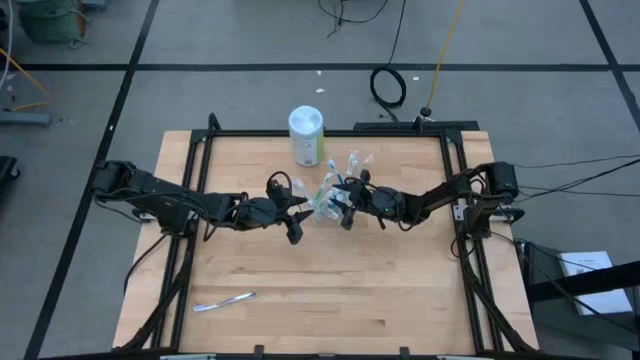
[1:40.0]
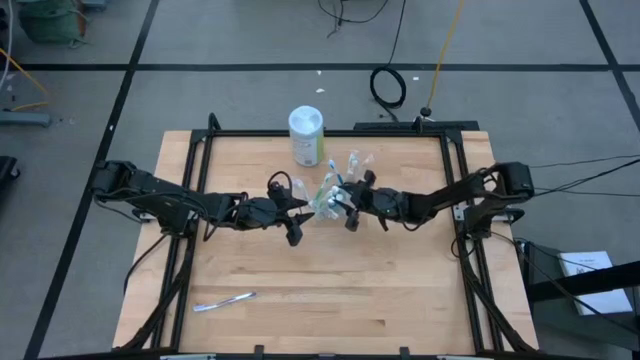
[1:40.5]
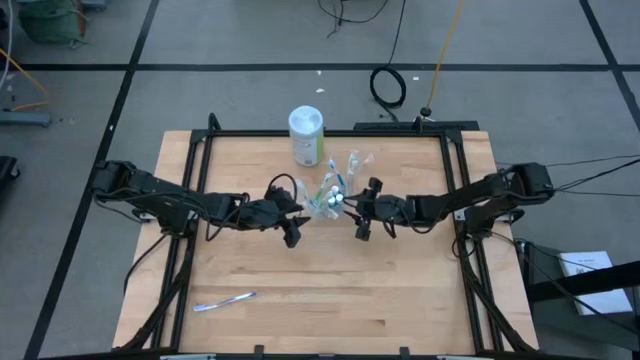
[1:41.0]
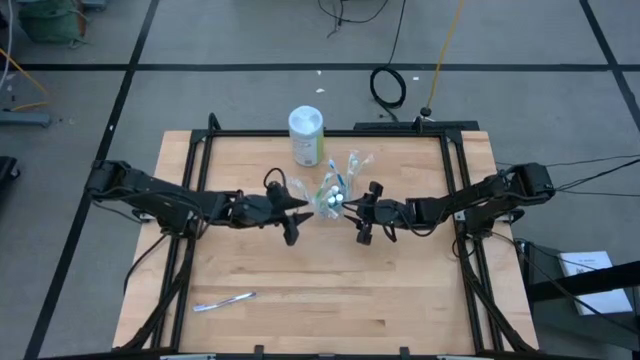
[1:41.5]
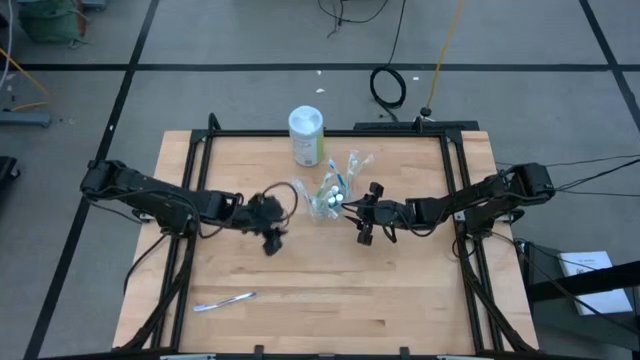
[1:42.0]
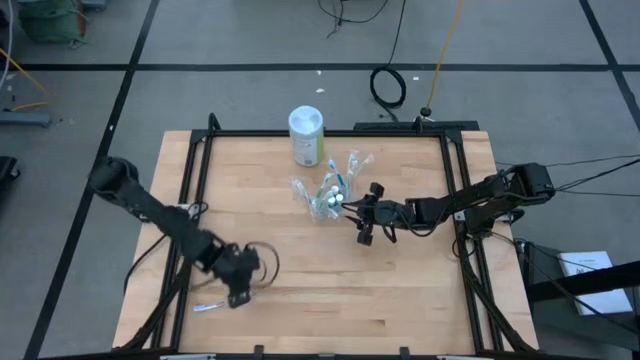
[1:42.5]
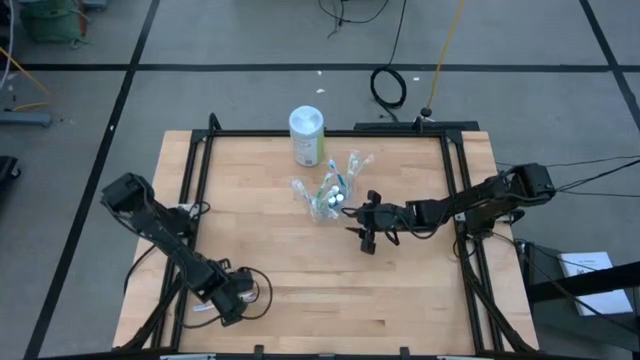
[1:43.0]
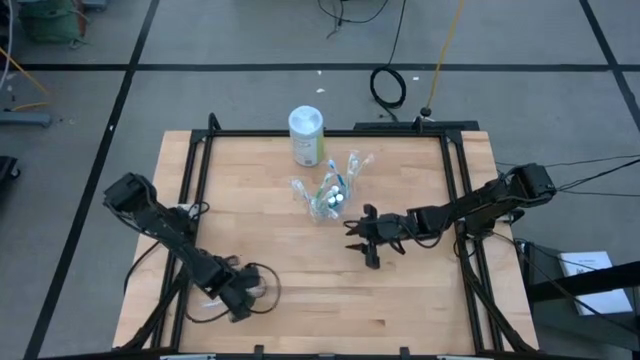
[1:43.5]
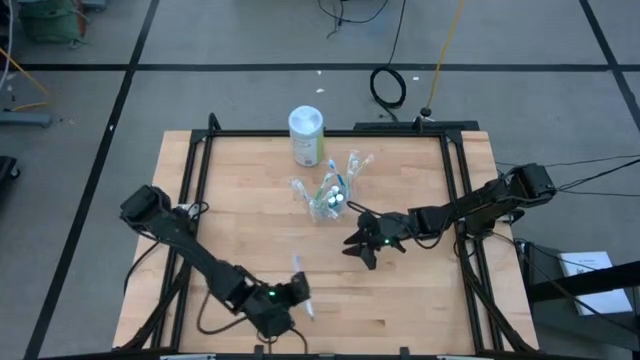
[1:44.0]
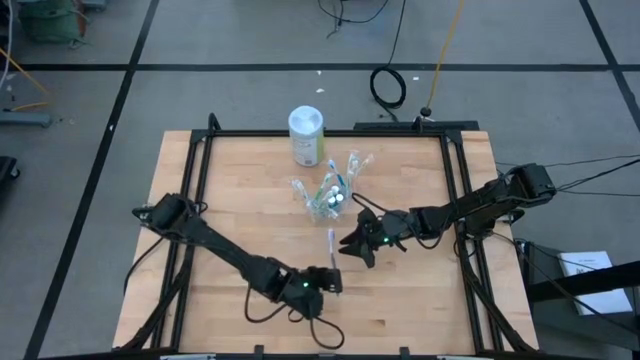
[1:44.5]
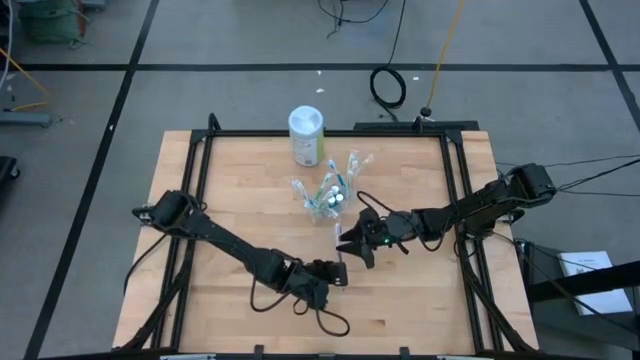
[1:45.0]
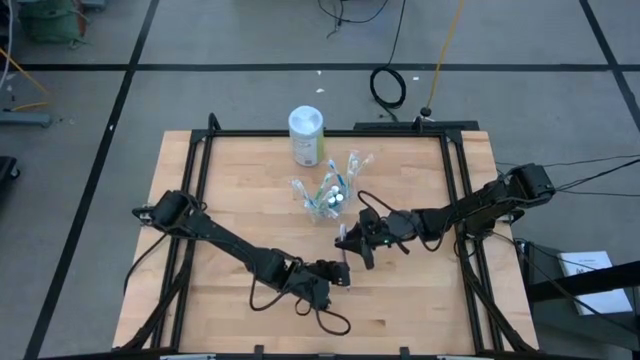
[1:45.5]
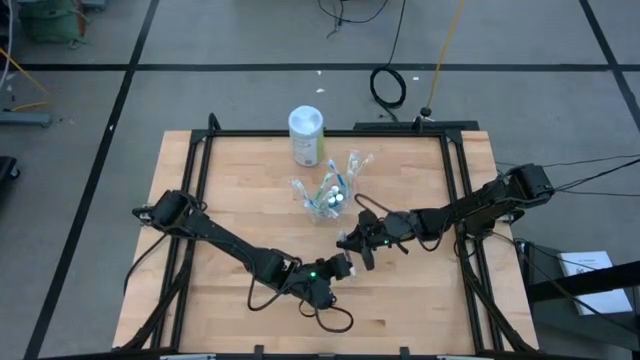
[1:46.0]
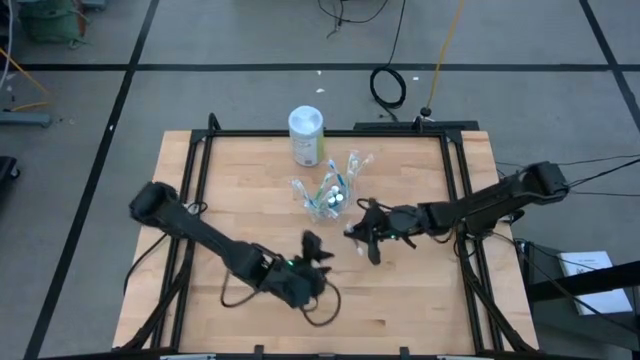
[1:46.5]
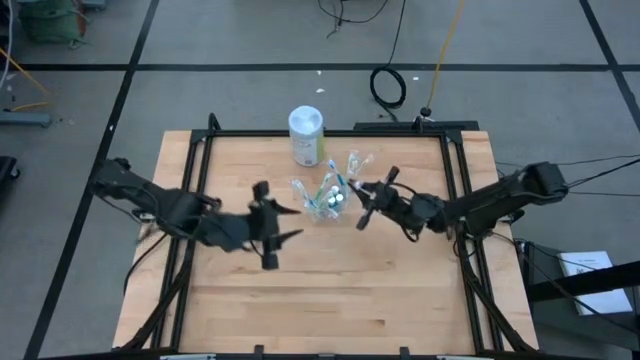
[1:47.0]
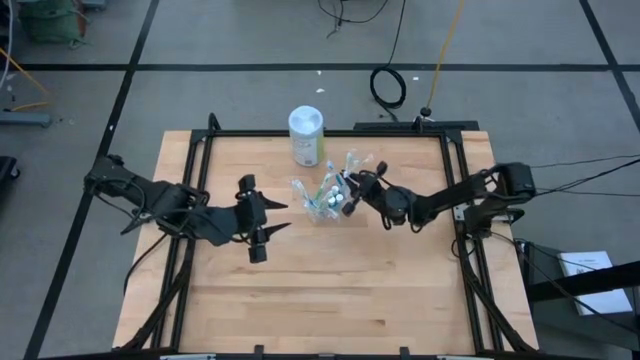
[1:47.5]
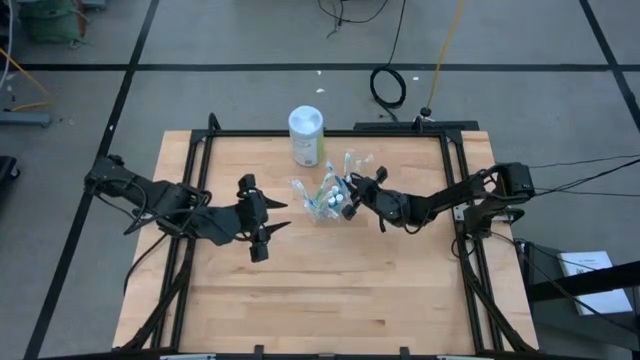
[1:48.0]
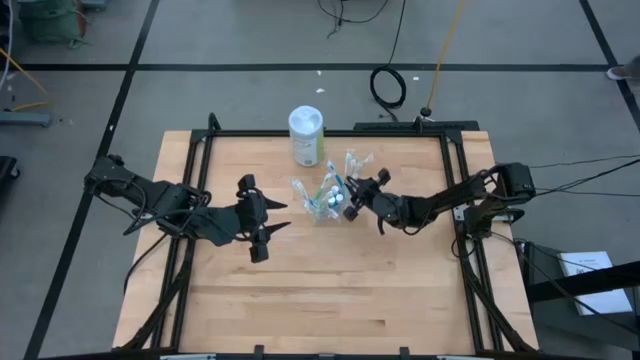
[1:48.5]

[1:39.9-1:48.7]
Task: Pick & Place toothbrushing station
Put the purple toothbrush into the transparent organizer

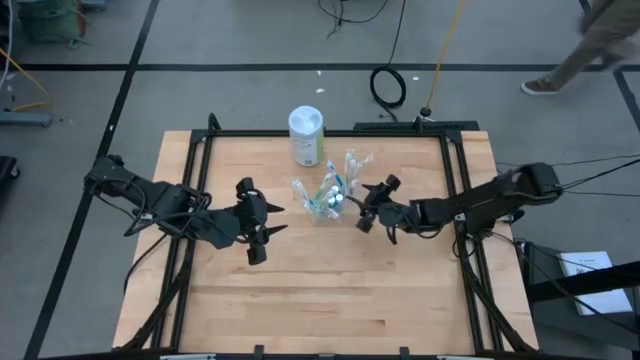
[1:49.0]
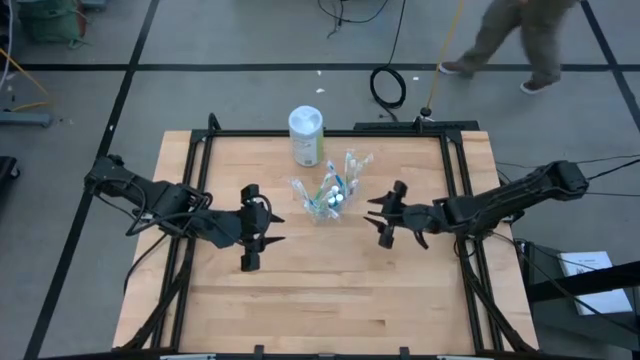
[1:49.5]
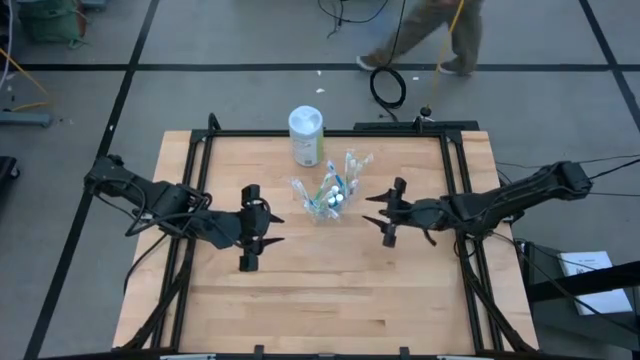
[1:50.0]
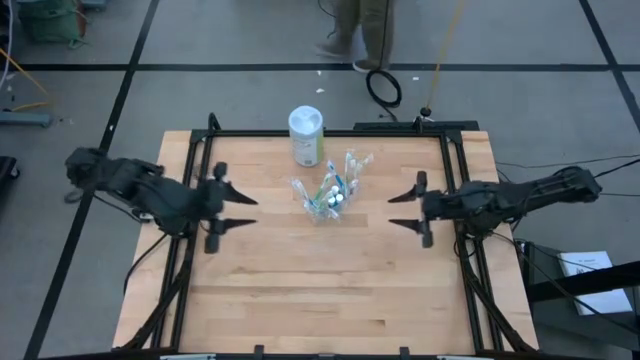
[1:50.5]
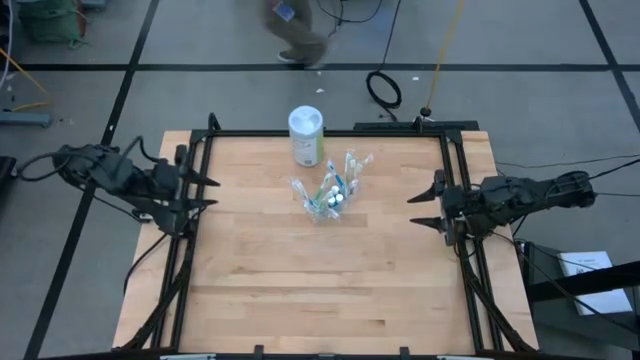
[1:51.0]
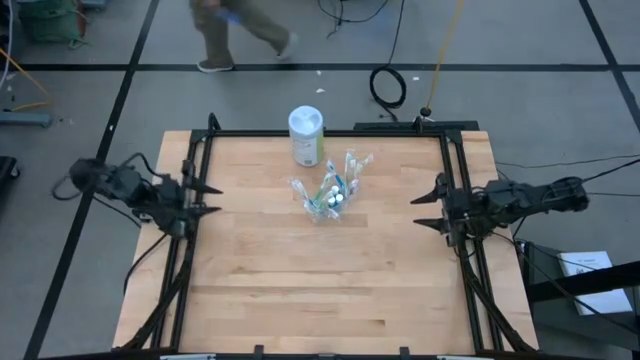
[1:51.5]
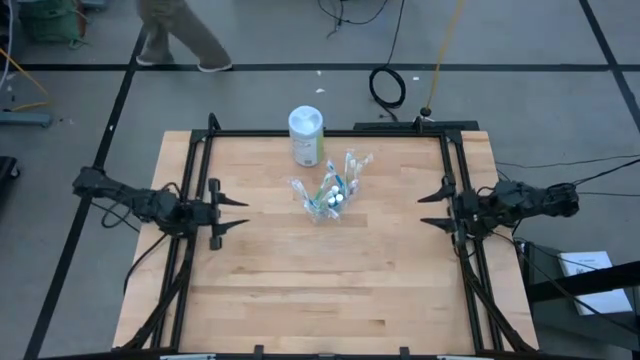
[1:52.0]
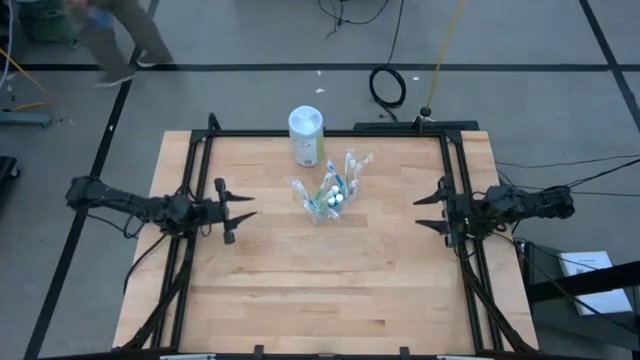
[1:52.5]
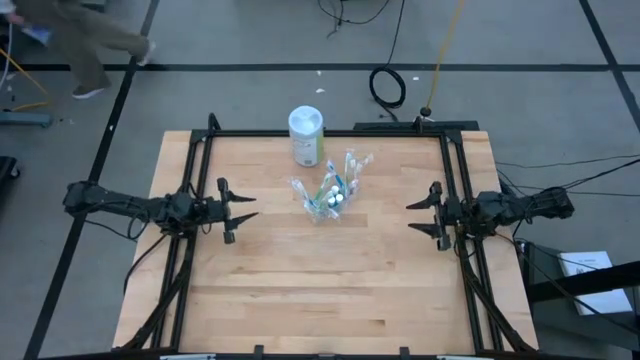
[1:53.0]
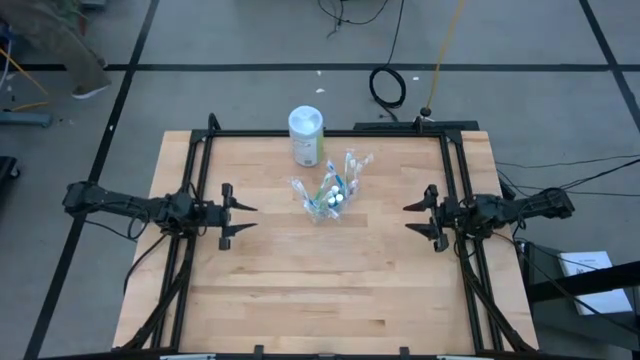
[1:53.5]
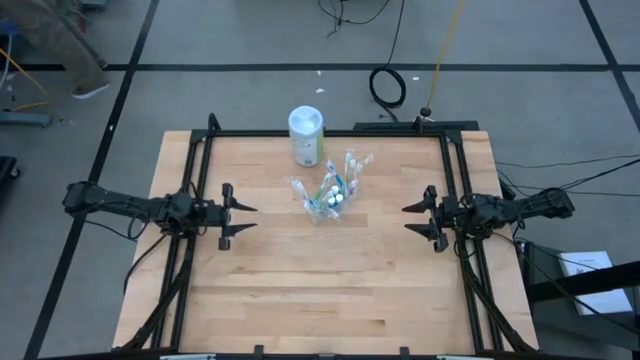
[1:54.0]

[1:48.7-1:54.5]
Return to Home Position

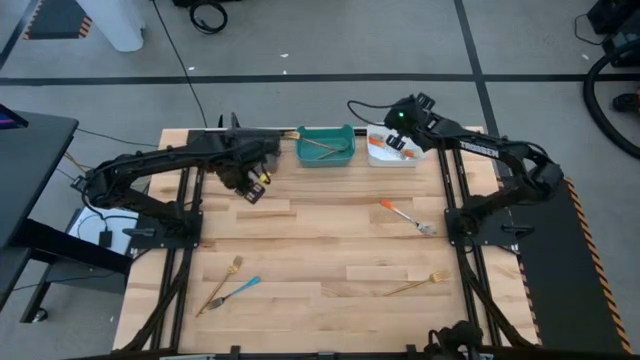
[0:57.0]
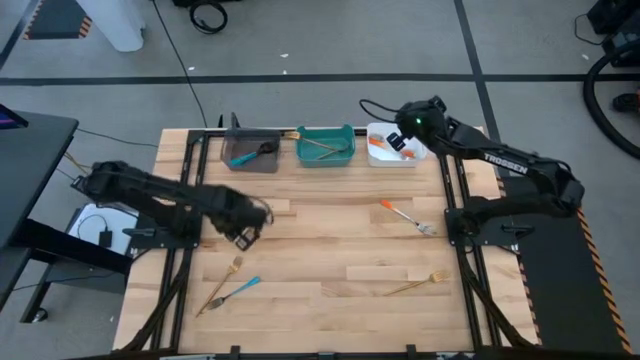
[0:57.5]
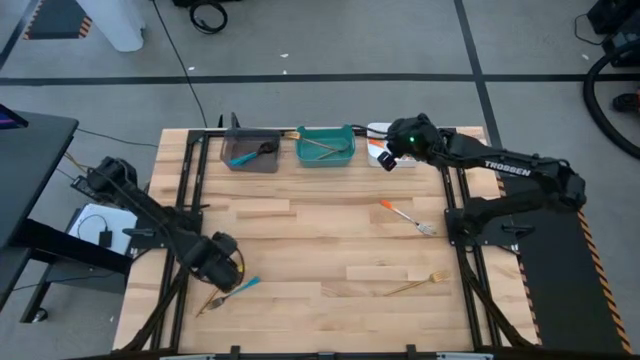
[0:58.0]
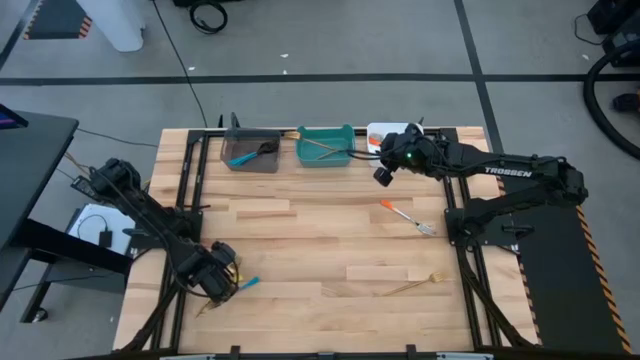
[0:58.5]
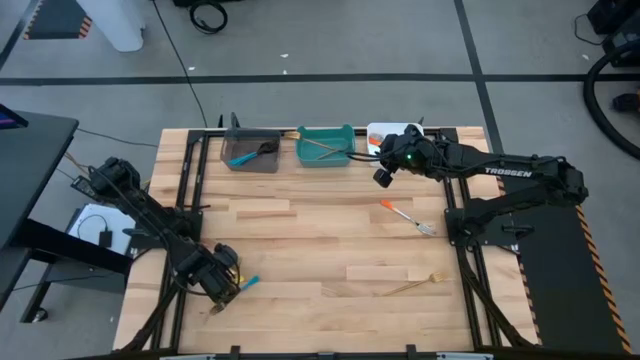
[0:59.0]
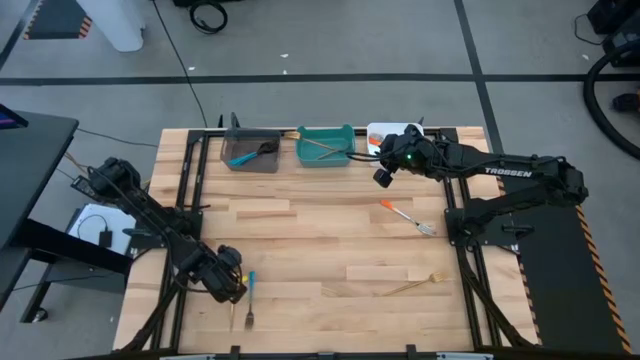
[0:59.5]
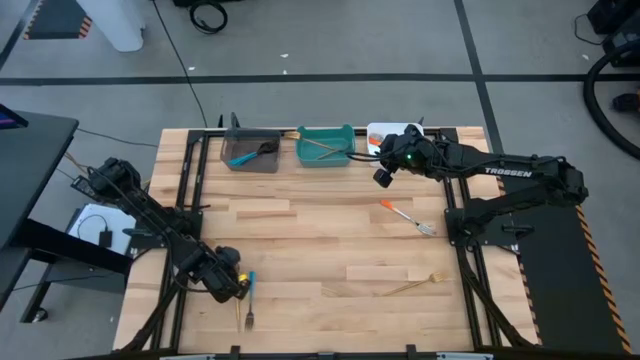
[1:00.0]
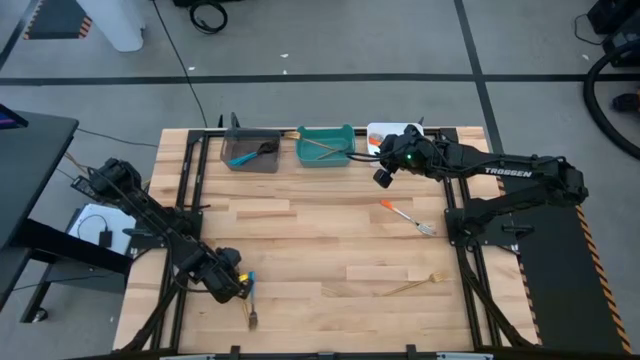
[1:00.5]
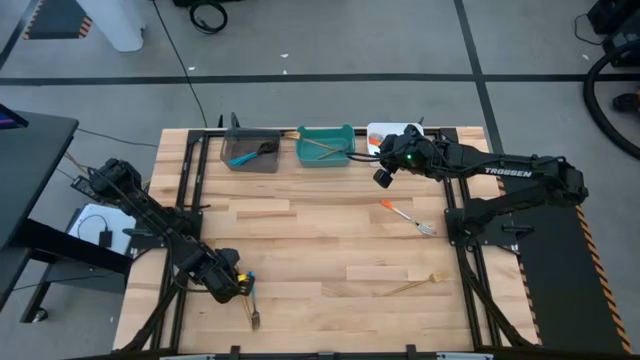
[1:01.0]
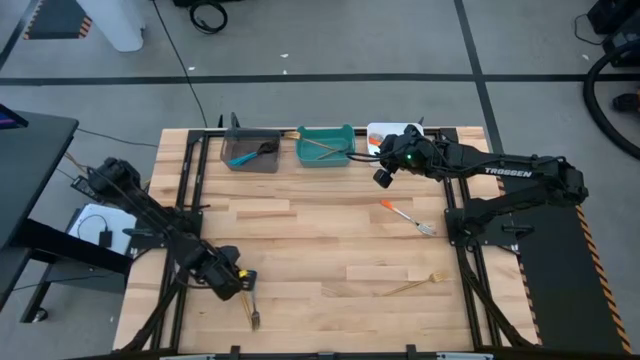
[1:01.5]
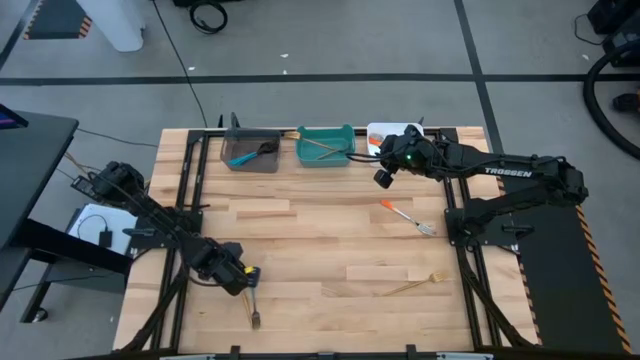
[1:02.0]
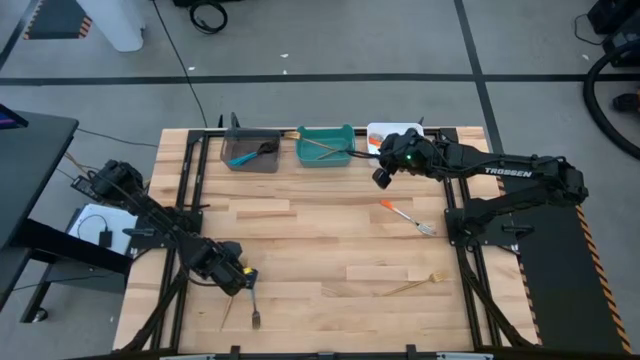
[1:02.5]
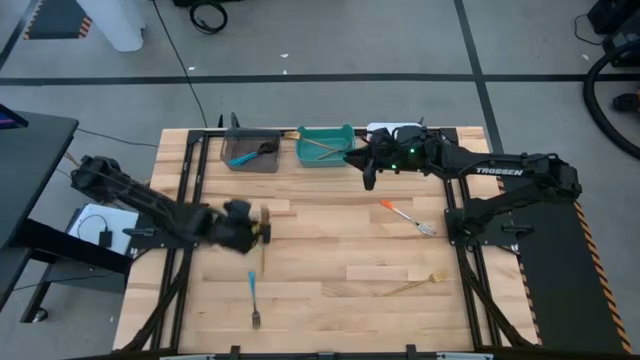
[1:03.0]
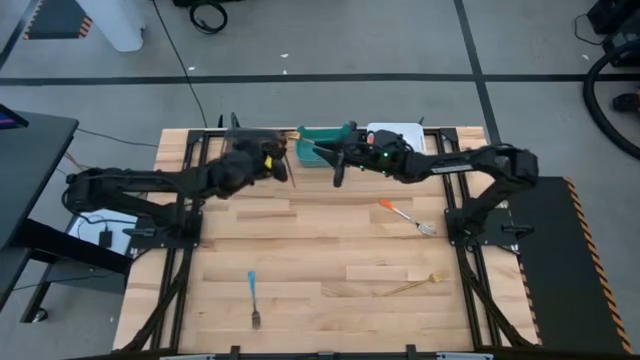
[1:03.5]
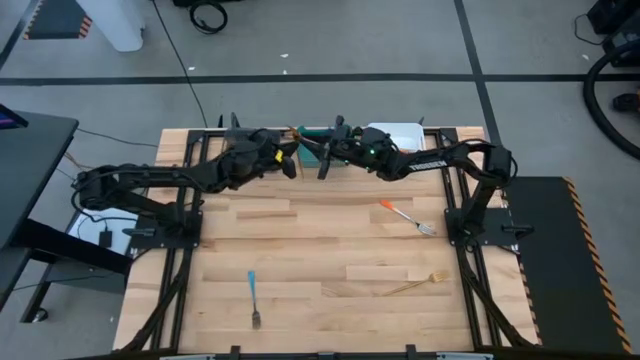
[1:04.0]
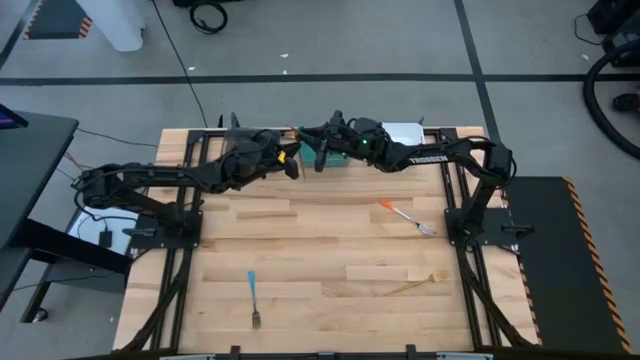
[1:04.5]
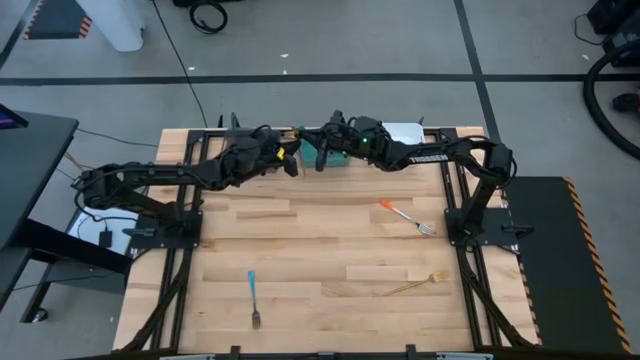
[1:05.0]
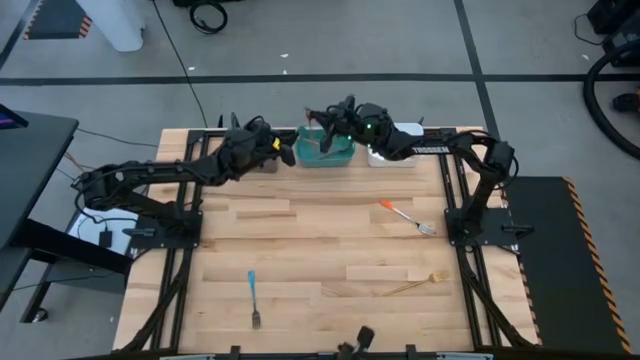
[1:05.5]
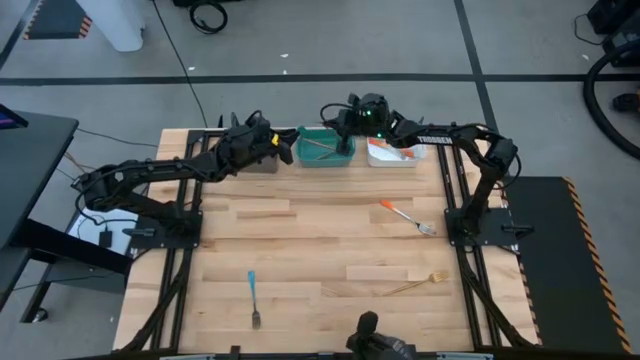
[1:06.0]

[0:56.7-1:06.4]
Task: Sort silverware by color (type)
Put the gold fork into the green bin
